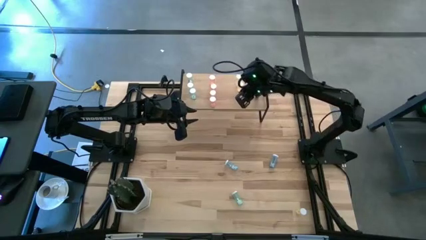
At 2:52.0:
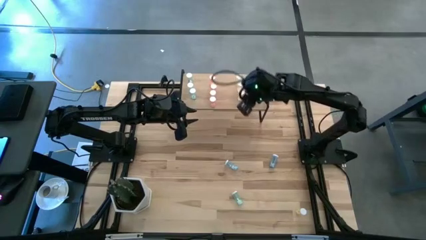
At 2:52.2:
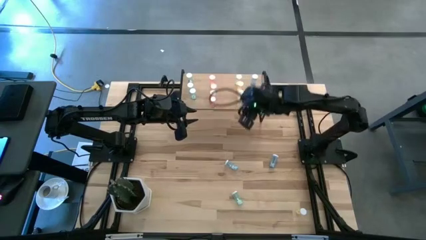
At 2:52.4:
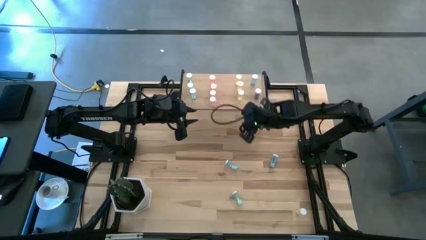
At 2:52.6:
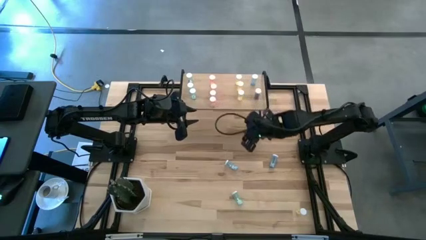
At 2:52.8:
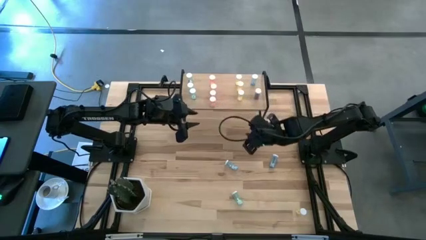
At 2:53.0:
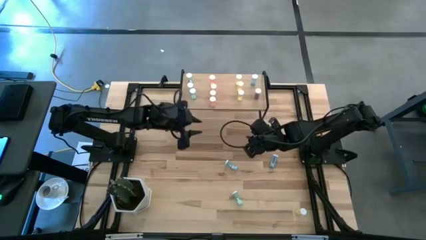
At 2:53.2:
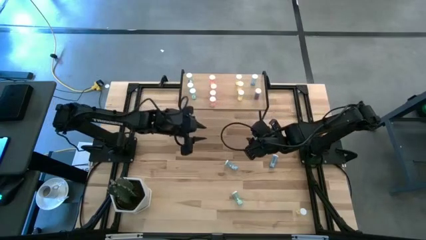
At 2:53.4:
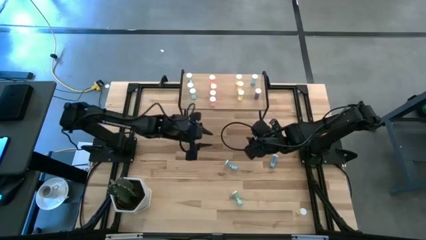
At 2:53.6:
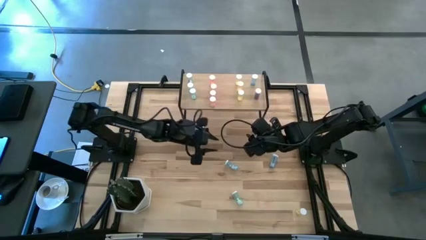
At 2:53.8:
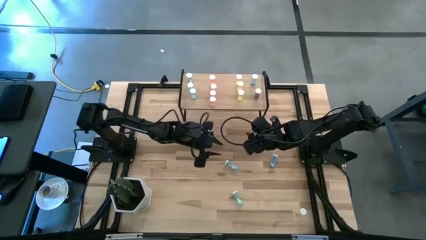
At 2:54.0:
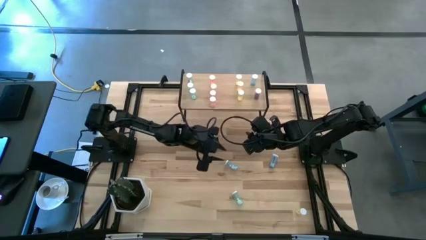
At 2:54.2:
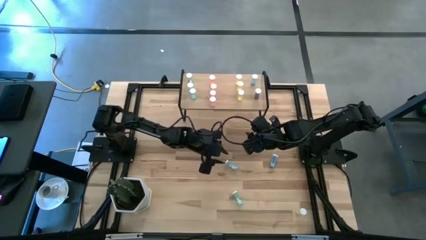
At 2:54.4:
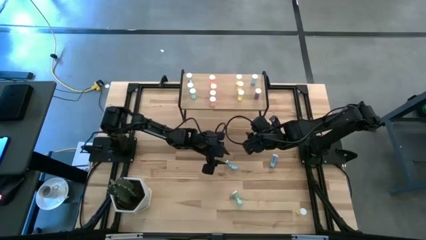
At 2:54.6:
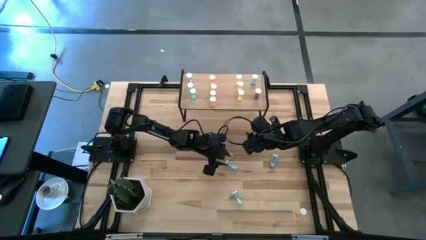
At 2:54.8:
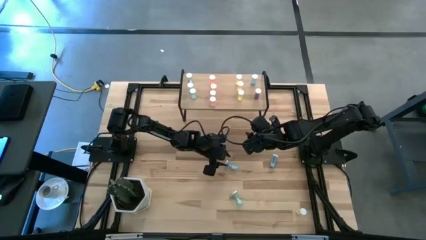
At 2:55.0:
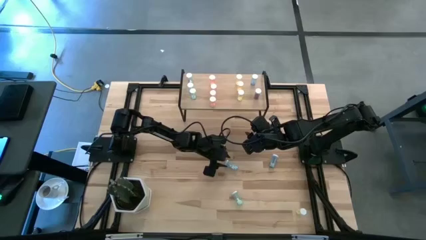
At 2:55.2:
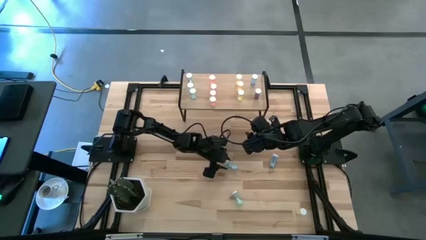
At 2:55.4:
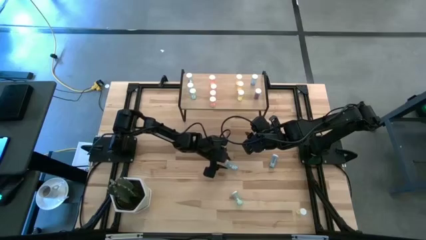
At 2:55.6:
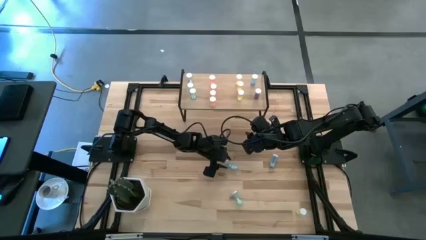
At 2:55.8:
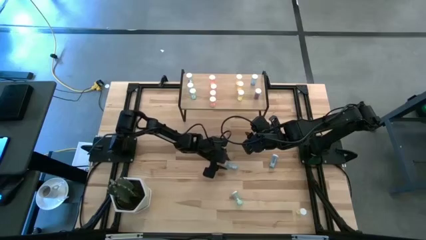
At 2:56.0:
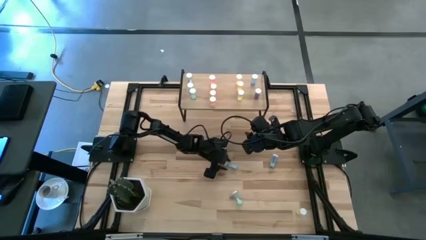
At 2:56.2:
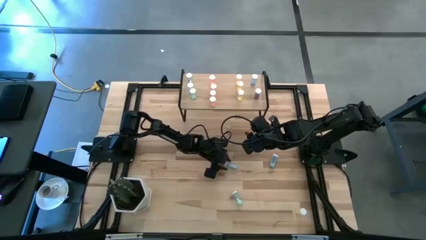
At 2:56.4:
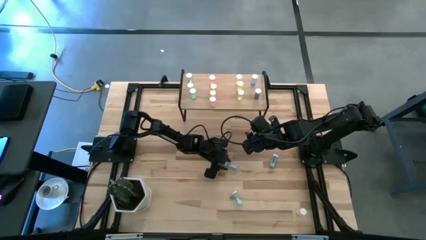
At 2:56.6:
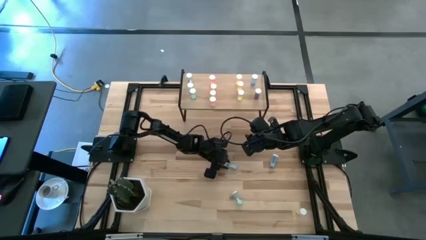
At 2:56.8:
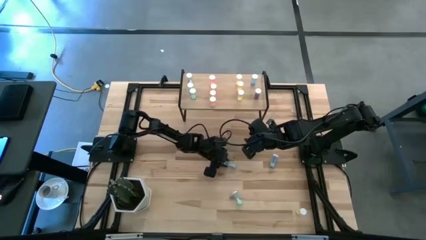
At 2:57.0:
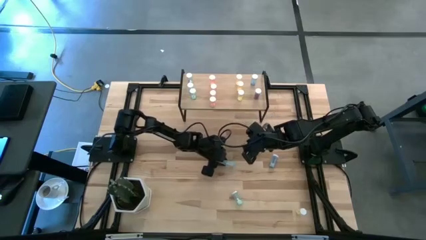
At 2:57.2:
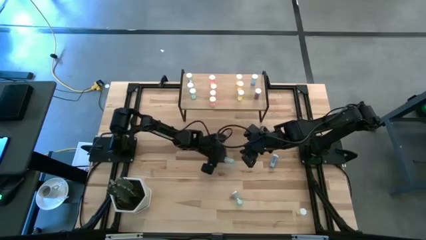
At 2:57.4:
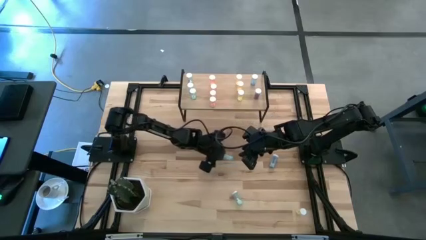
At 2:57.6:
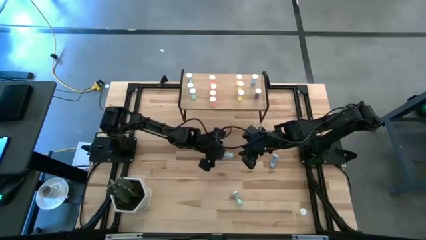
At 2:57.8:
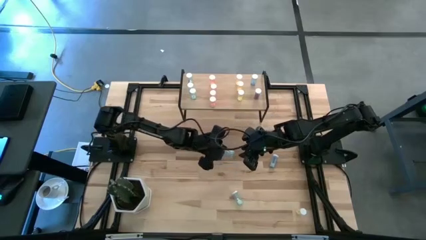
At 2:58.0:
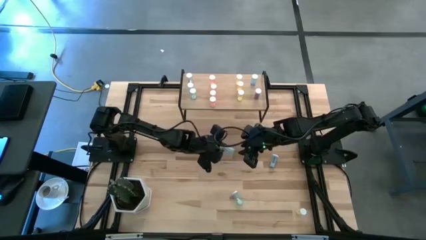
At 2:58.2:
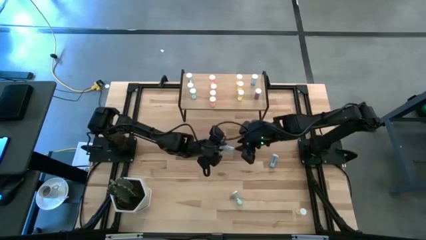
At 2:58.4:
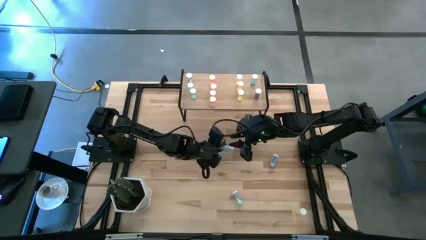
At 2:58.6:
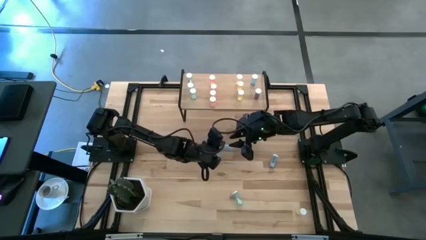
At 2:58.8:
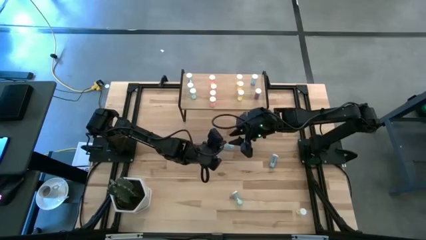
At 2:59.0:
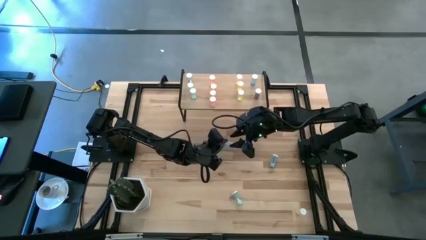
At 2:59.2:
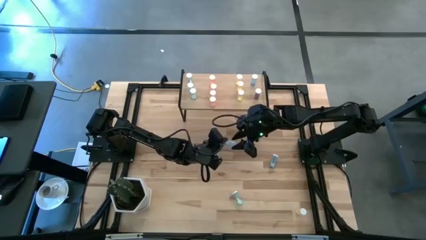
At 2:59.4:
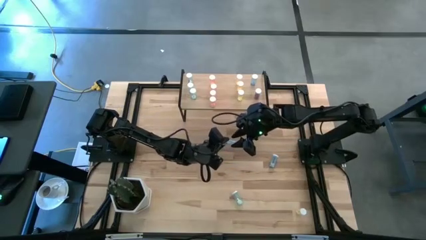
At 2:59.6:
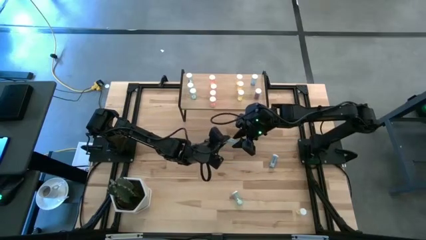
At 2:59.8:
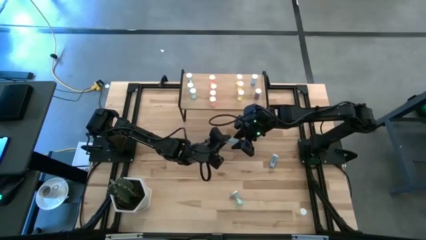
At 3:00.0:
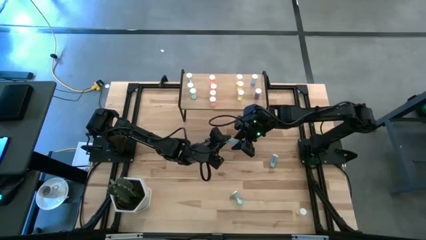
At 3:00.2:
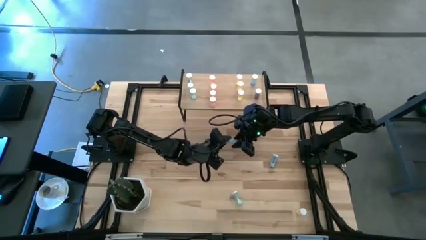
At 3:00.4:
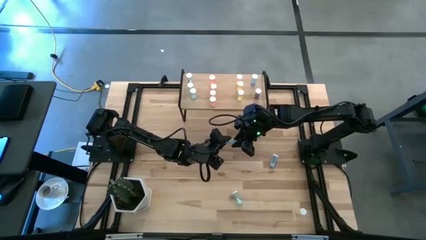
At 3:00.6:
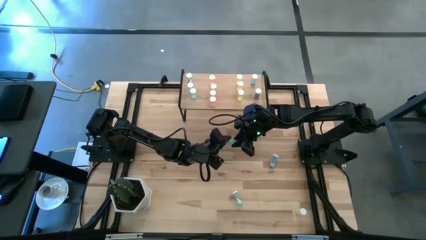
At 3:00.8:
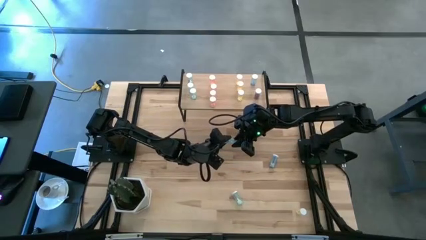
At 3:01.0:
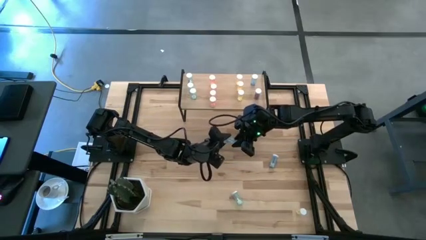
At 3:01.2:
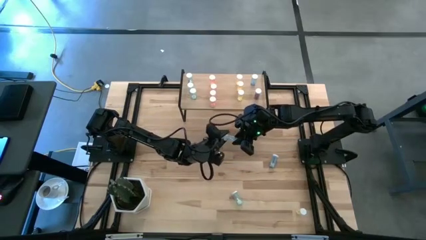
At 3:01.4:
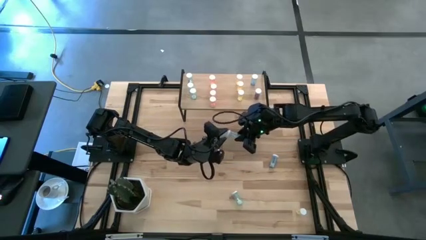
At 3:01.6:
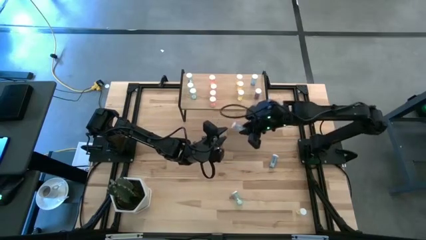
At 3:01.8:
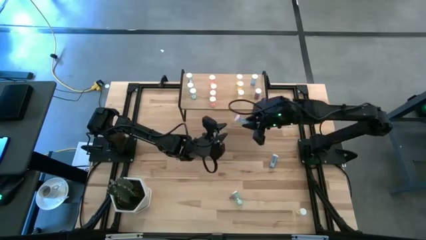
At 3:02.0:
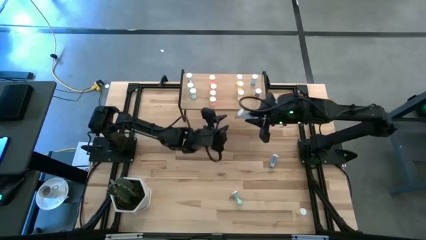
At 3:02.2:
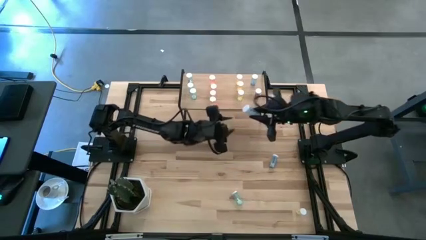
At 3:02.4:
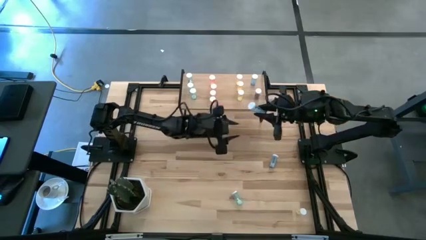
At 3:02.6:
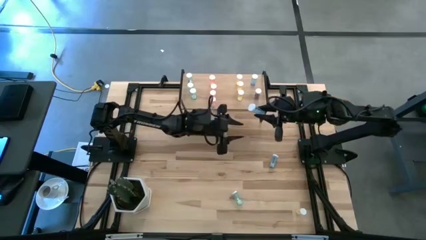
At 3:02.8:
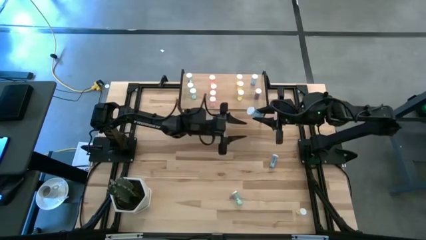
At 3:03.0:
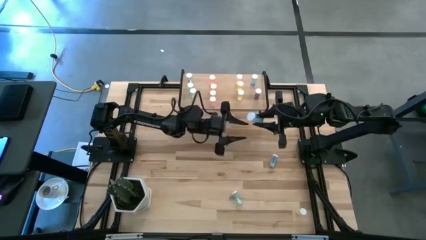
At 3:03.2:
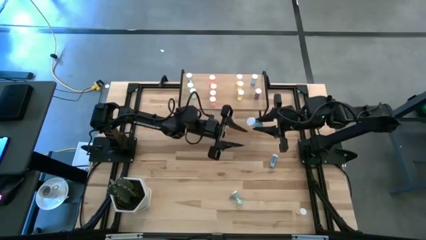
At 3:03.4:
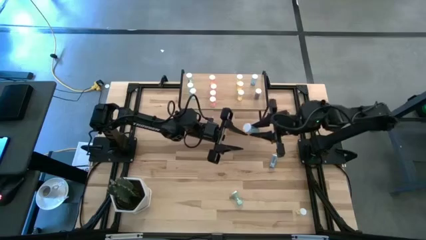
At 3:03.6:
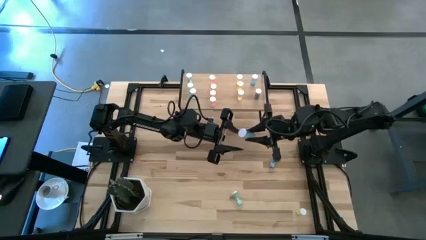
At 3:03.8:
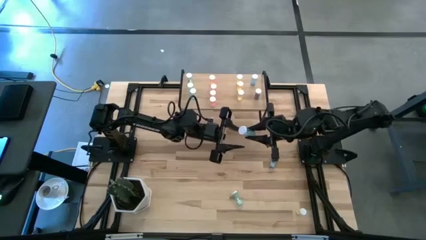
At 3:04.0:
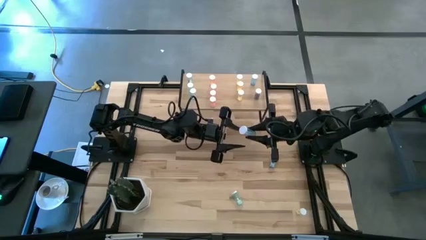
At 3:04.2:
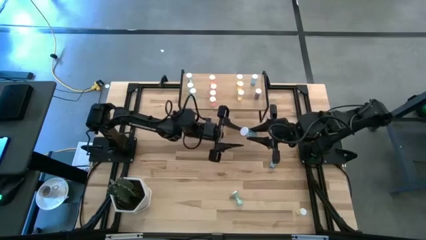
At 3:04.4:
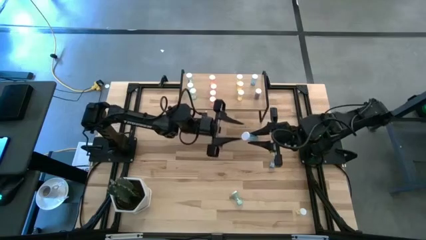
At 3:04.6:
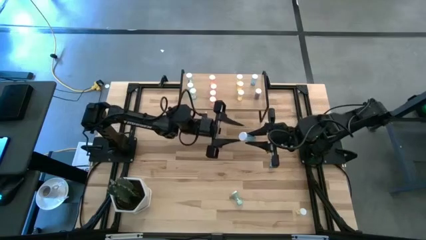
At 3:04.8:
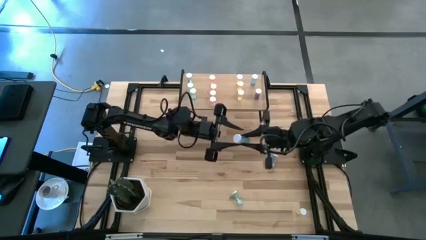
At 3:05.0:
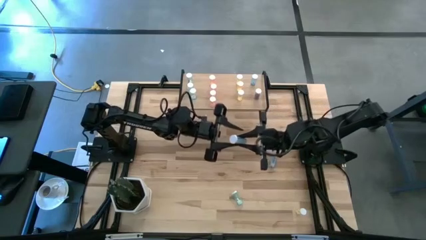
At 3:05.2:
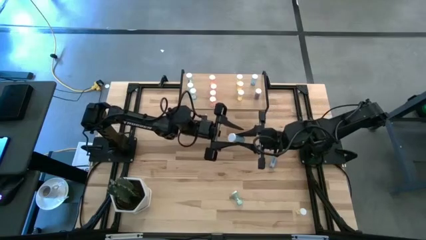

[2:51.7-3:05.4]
Task: Pick and place medicine bottles onto shelf by color
Align the blue pill bottle with the blue pill bottle
